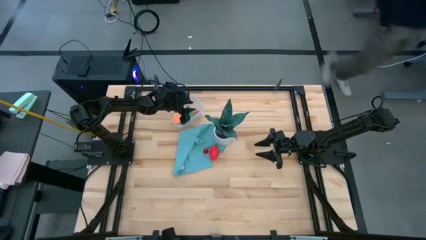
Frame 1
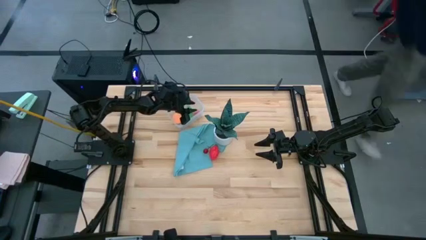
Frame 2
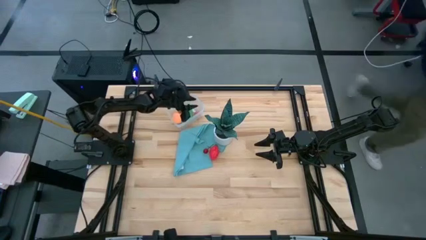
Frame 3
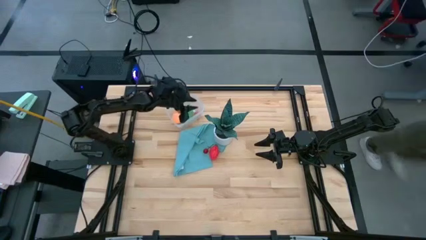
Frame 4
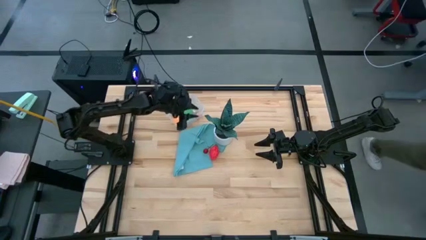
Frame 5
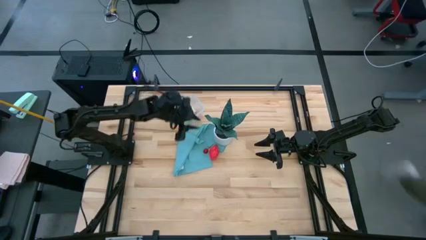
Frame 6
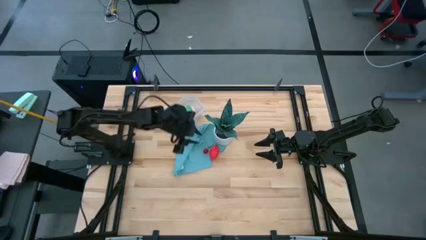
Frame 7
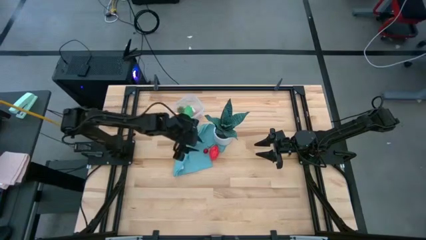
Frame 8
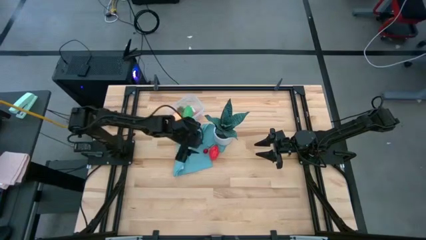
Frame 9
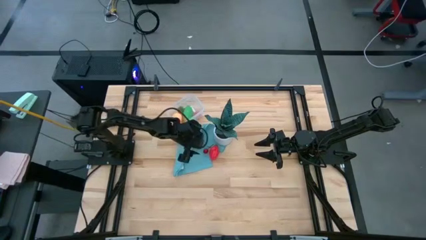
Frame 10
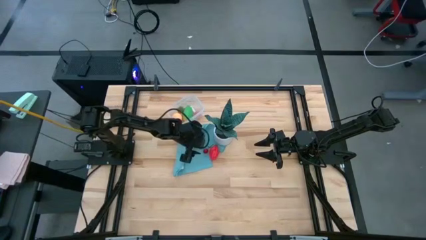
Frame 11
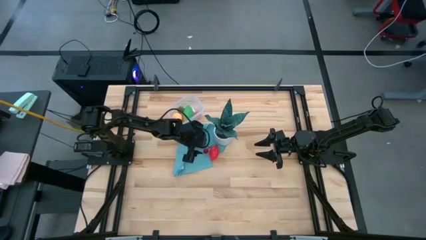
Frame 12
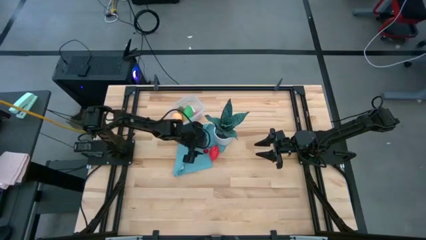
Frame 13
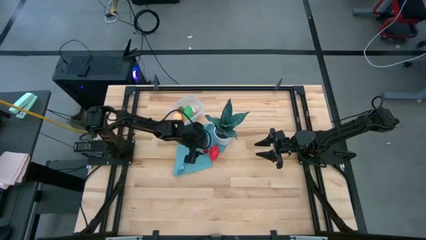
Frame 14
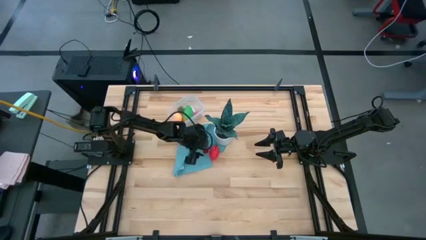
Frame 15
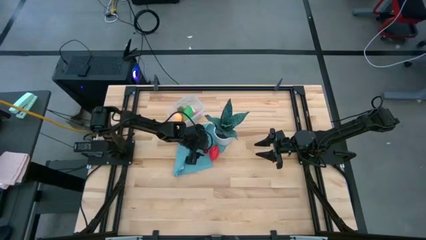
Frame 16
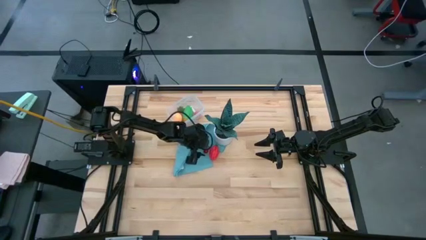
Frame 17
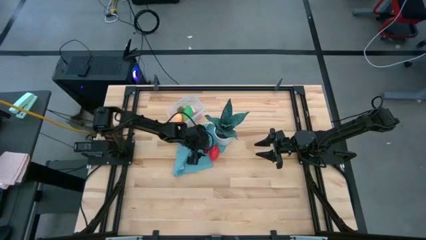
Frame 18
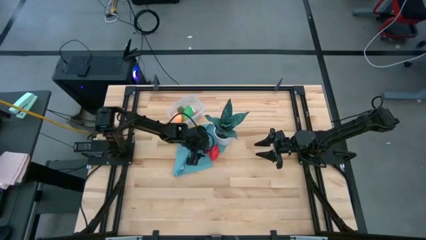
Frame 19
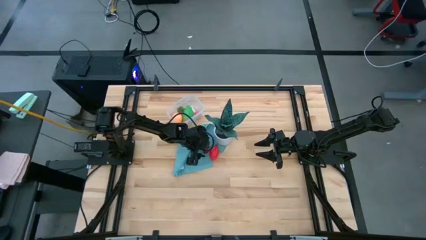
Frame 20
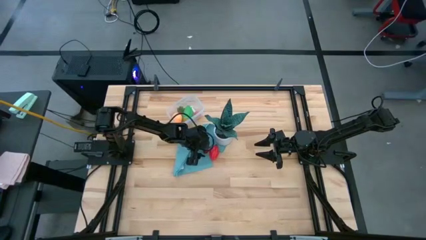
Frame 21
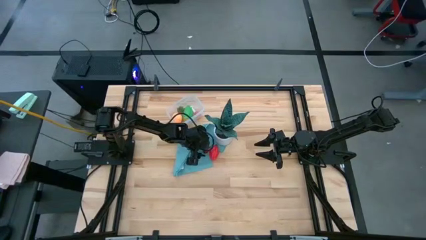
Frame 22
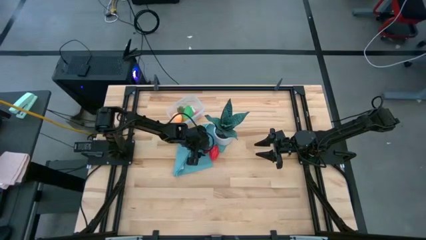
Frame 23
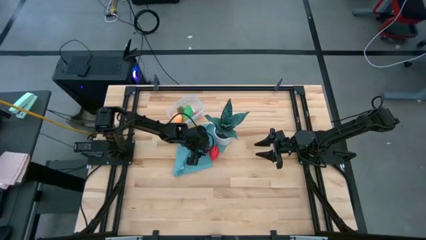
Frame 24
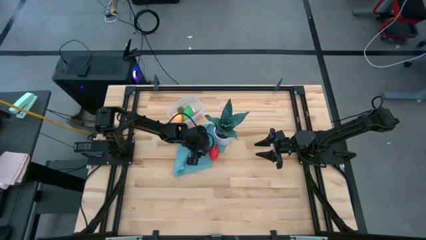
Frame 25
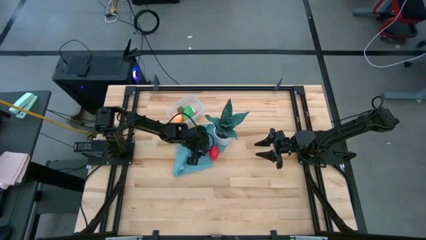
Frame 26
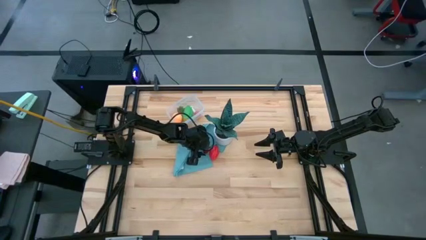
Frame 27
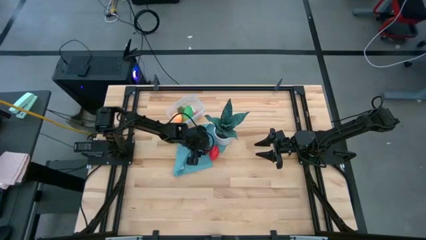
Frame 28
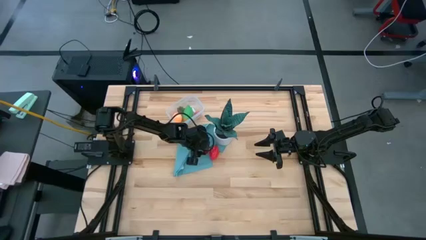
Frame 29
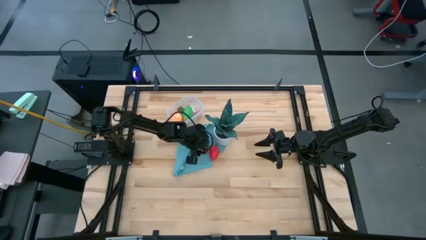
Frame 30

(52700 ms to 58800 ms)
Task: Pick and placing Produce into tupperware
Put the cherry into the transparent bin

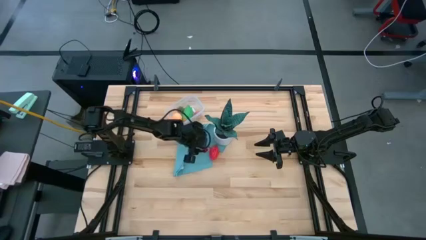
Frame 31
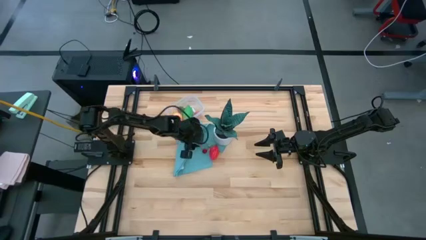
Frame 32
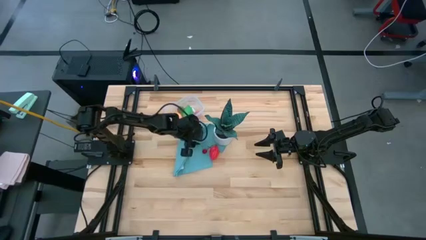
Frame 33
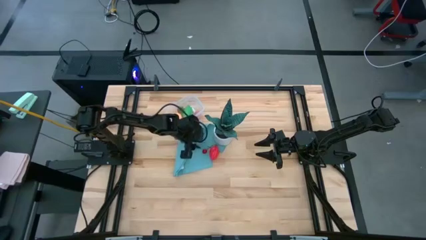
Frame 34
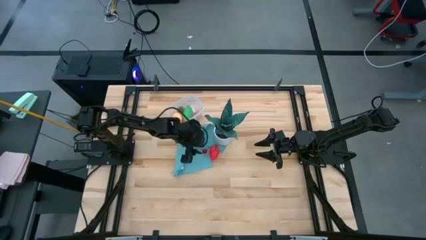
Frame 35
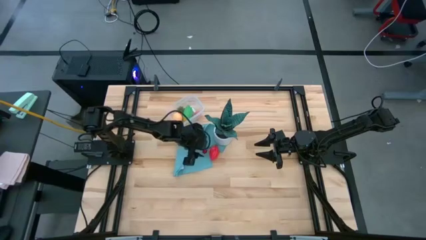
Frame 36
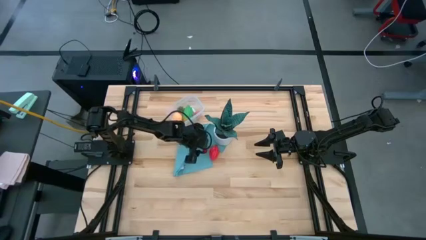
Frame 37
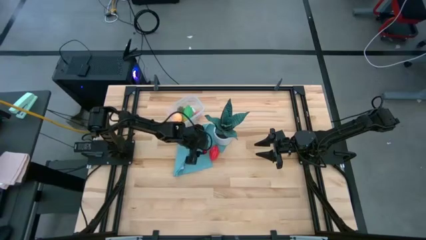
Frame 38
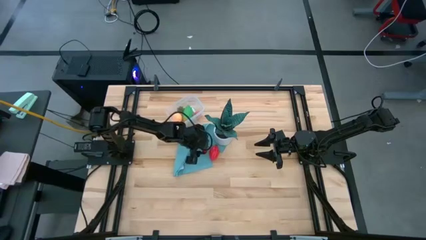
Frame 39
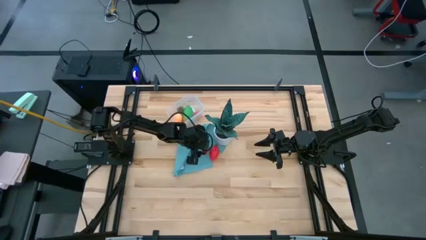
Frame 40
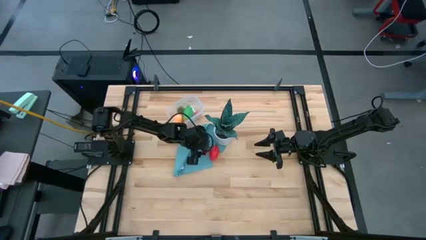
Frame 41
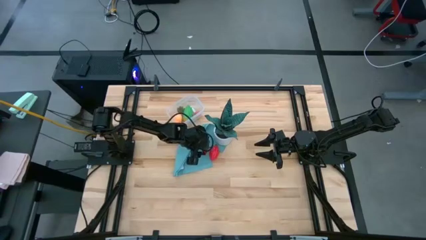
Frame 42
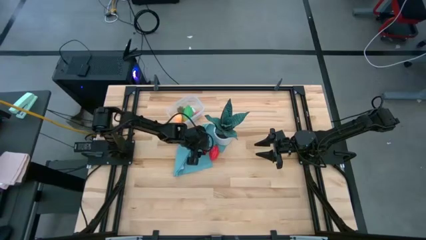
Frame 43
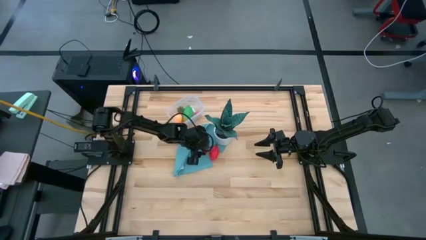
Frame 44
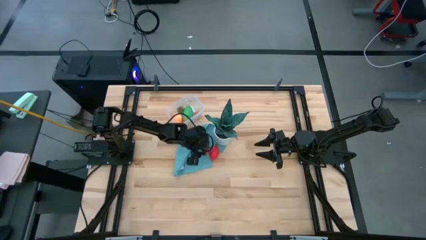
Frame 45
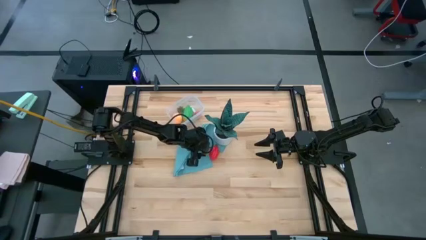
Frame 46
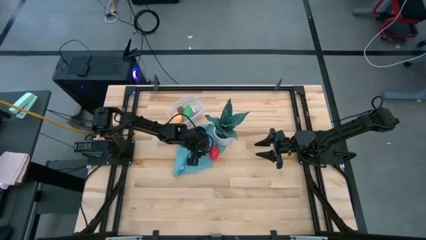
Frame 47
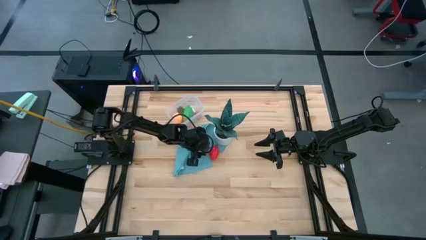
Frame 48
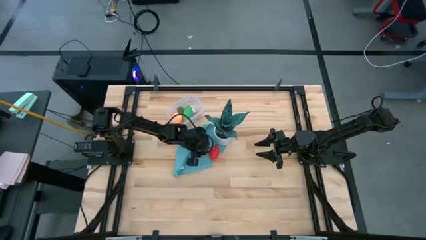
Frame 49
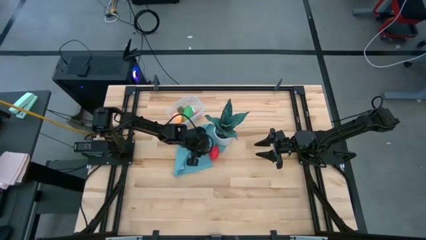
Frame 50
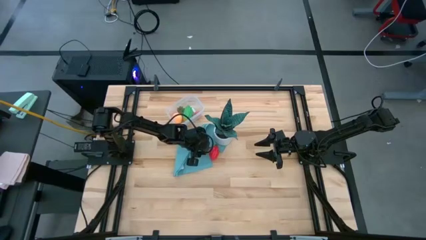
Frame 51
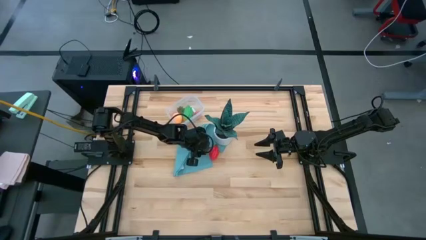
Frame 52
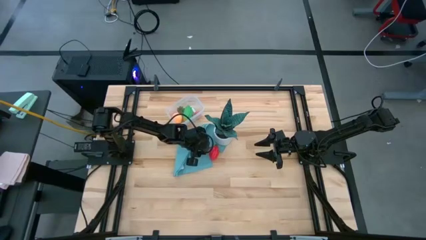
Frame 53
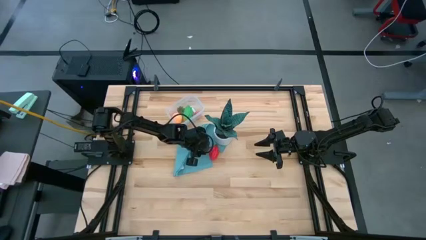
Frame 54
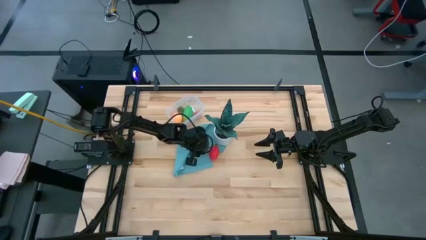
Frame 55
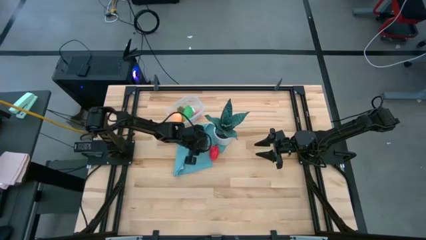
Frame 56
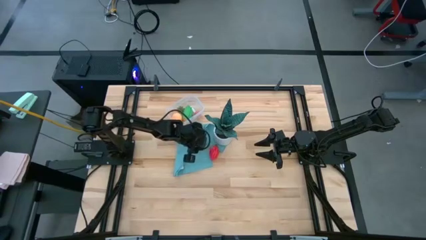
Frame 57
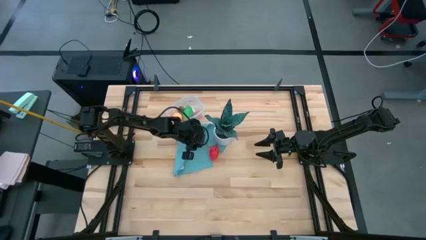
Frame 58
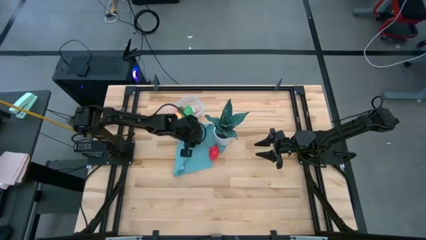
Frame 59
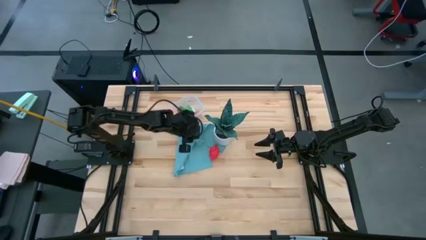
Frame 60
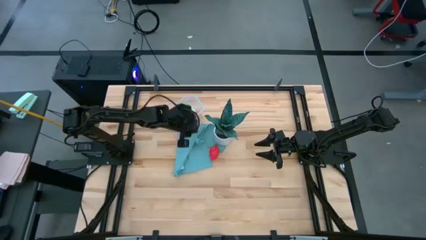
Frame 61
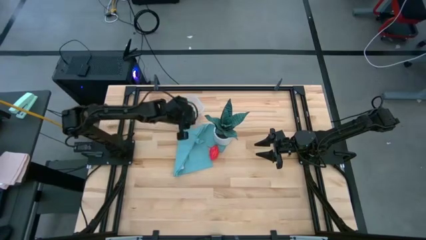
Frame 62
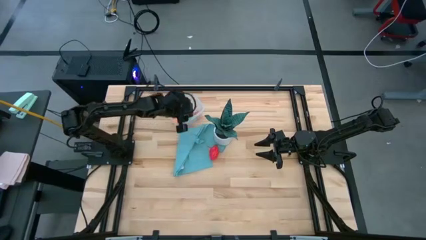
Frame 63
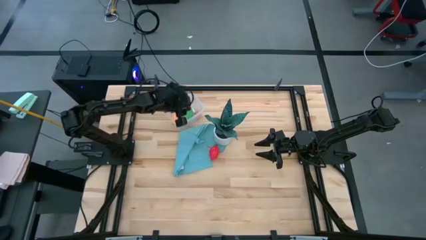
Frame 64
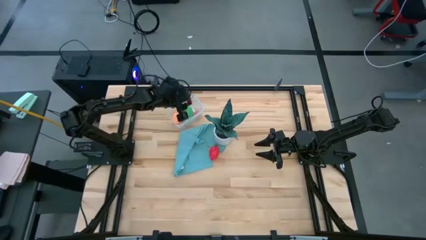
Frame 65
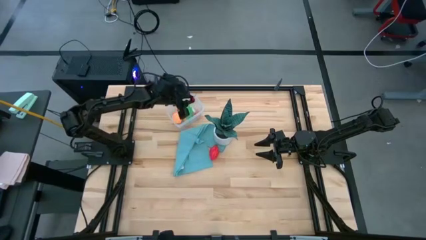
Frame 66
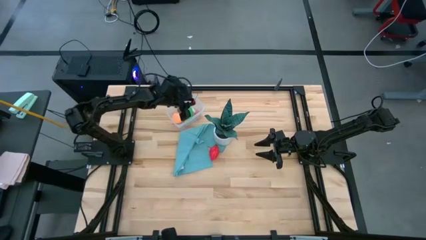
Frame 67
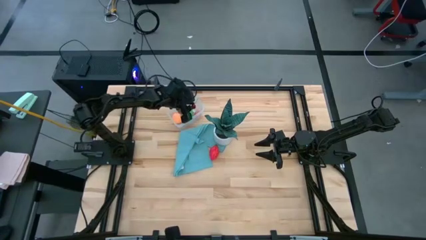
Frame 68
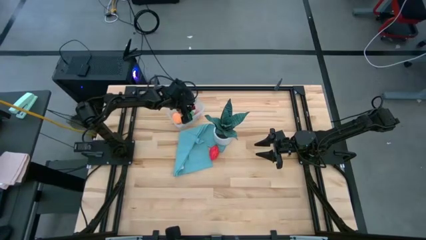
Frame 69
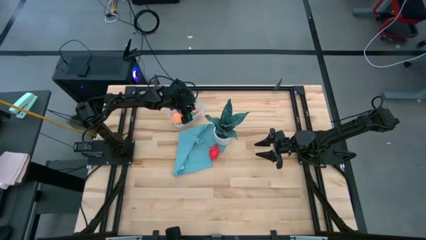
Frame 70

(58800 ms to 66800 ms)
Put the cherry into the transparent bin
